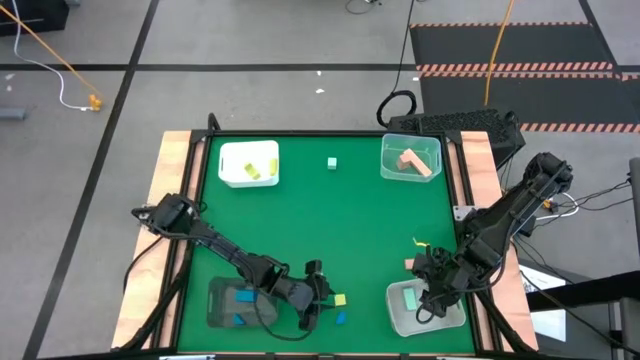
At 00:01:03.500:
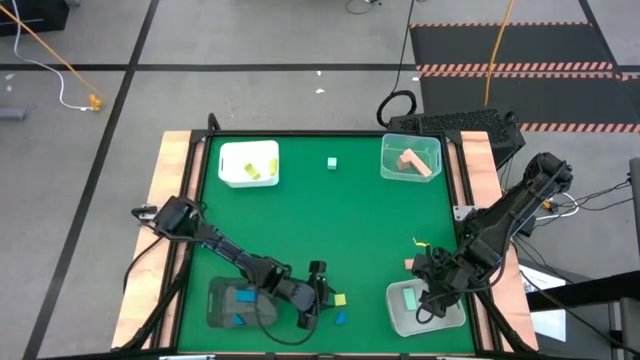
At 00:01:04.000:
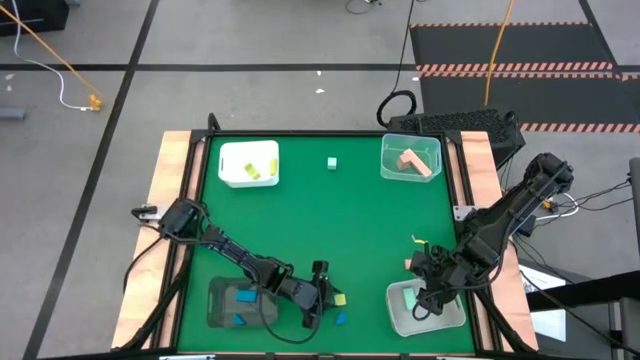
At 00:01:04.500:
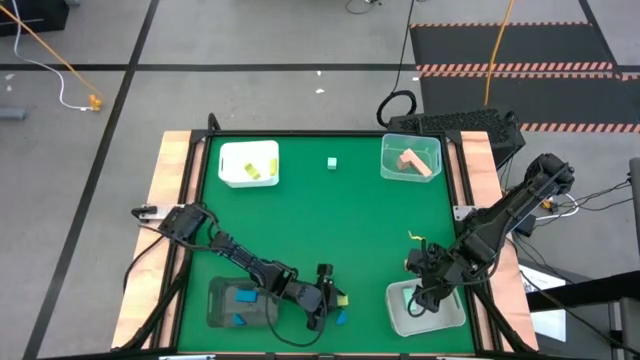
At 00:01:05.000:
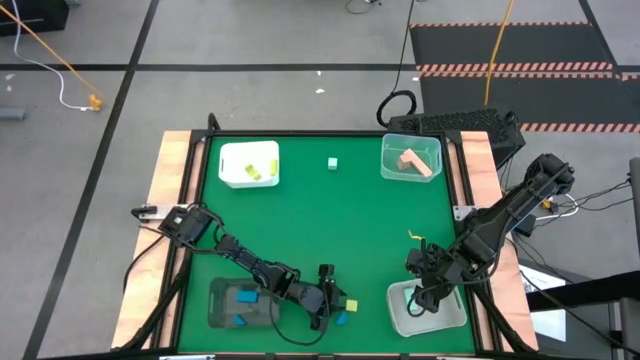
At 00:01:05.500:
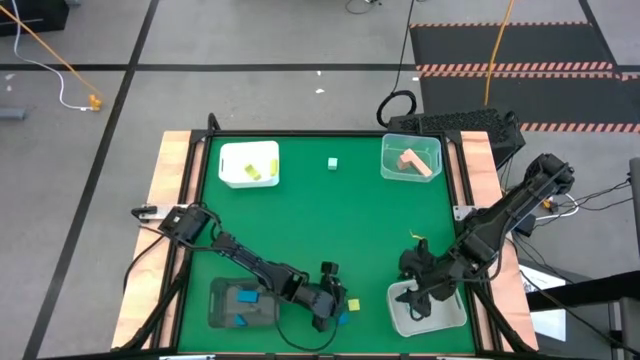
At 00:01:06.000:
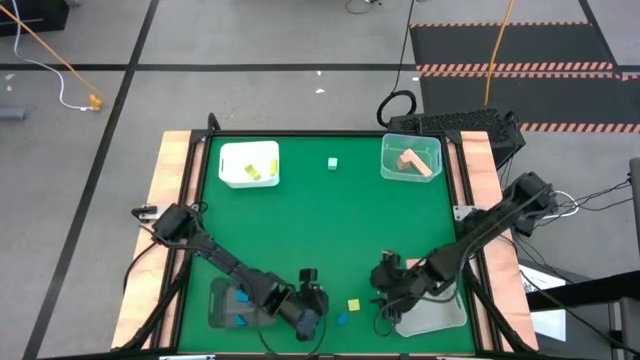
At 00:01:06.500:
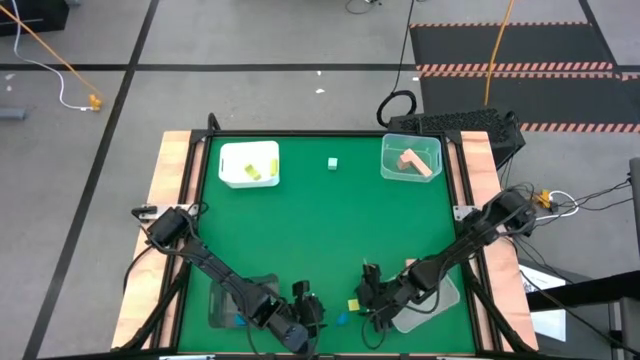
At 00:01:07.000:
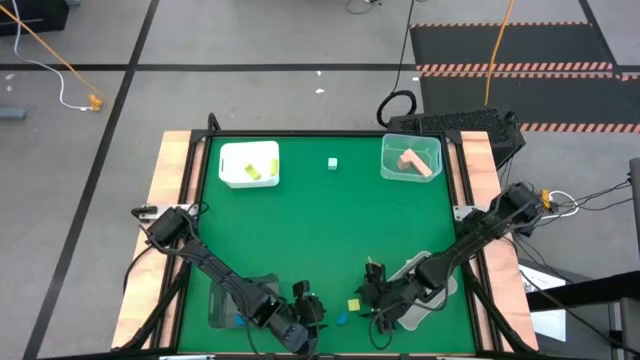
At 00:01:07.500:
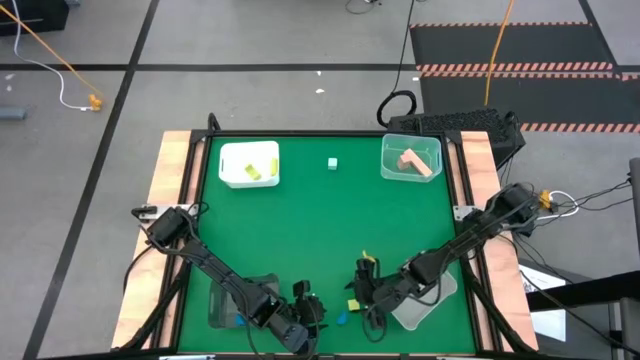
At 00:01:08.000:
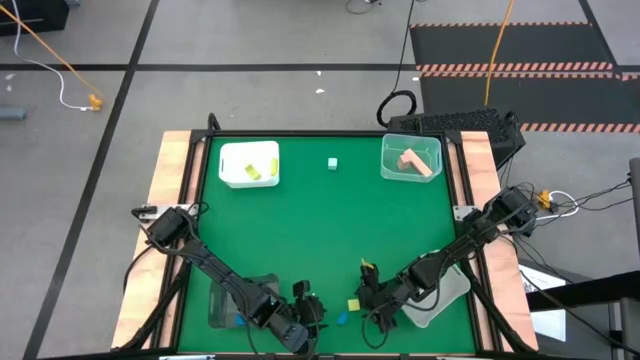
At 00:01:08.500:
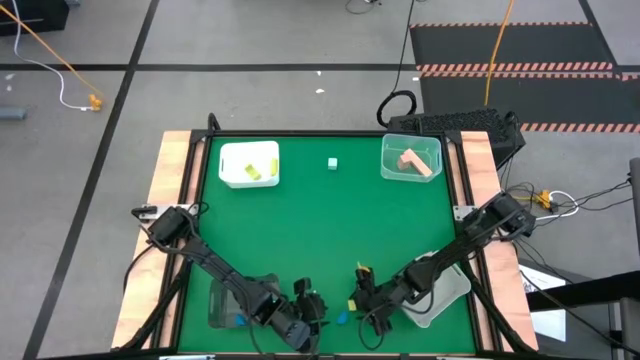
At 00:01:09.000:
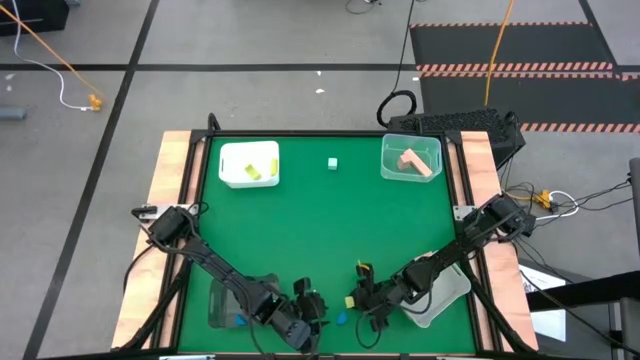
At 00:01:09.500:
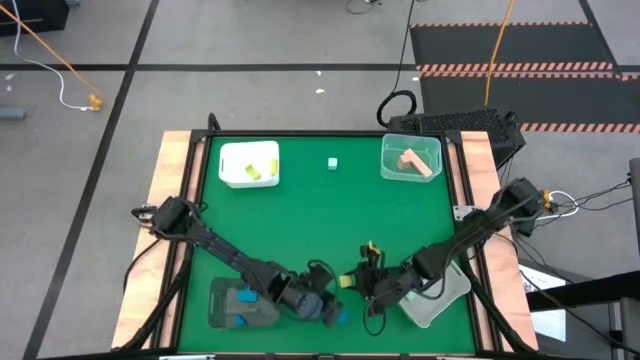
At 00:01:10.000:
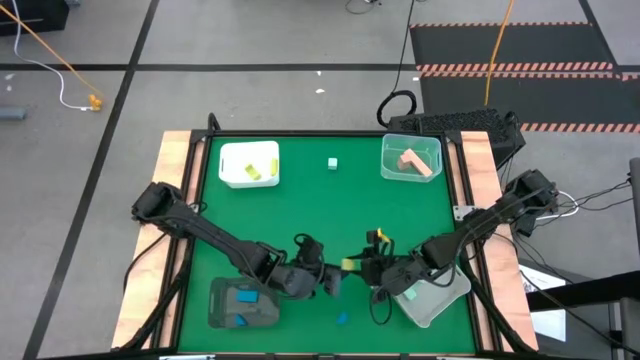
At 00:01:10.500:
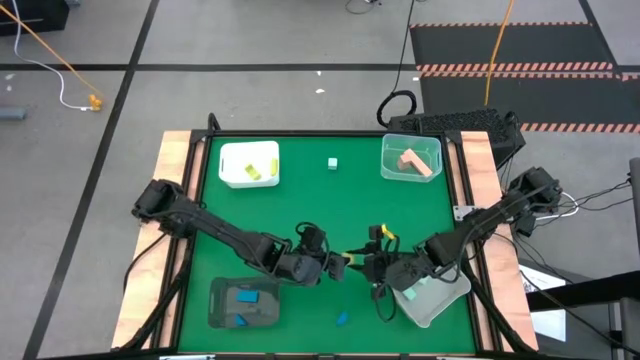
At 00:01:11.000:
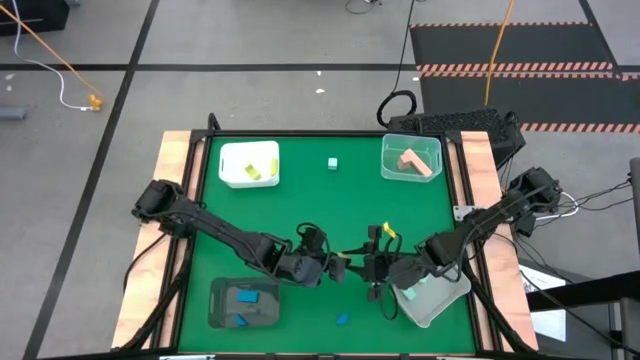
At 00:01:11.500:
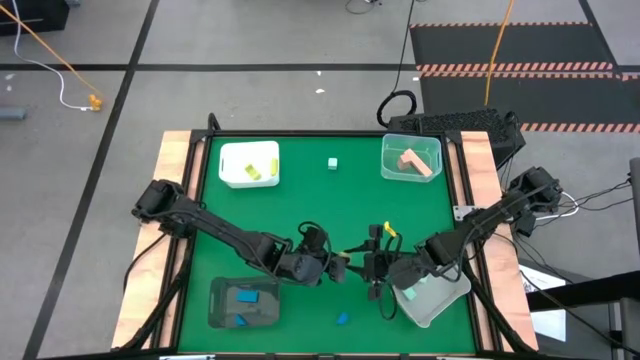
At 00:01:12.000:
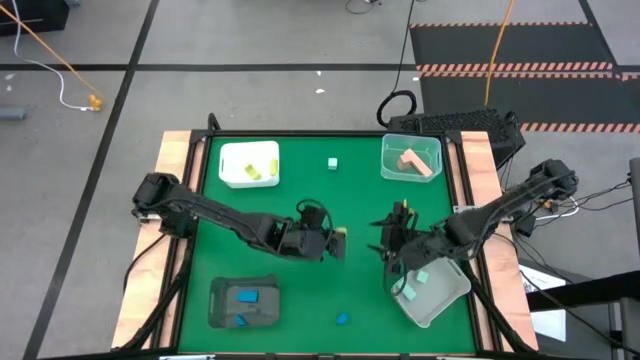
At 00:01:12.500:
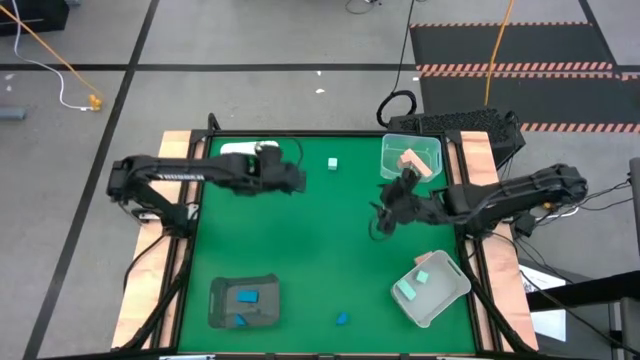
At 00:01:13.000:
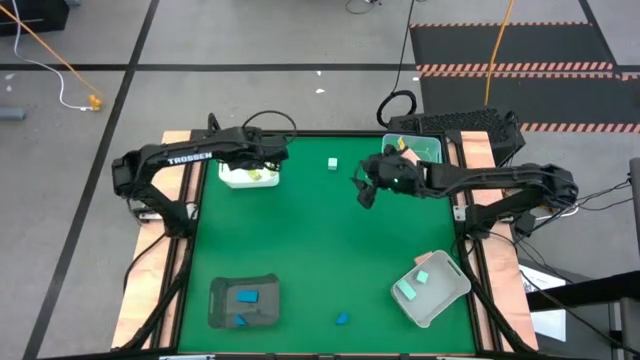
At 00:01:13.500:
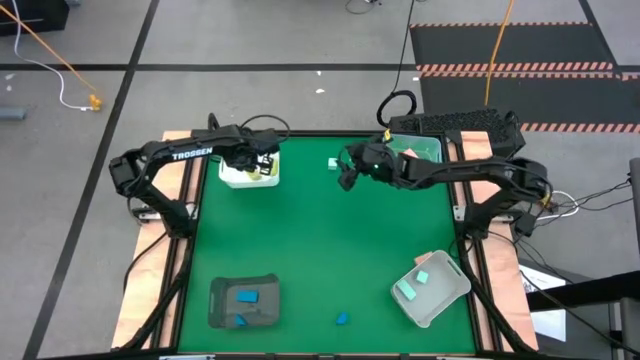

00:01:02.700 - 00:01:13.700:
Task: Sort & place blocks by color
Put the green block into the white bin

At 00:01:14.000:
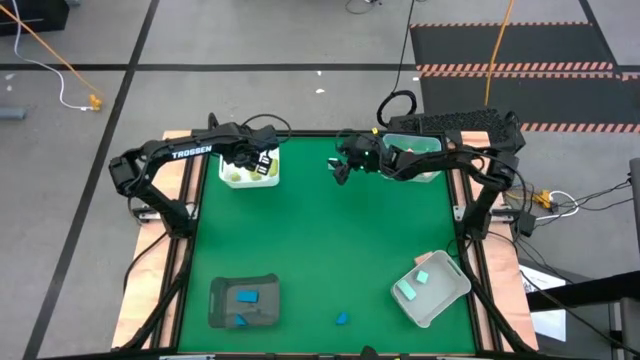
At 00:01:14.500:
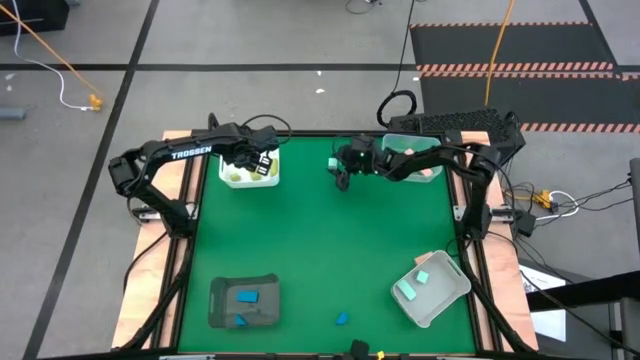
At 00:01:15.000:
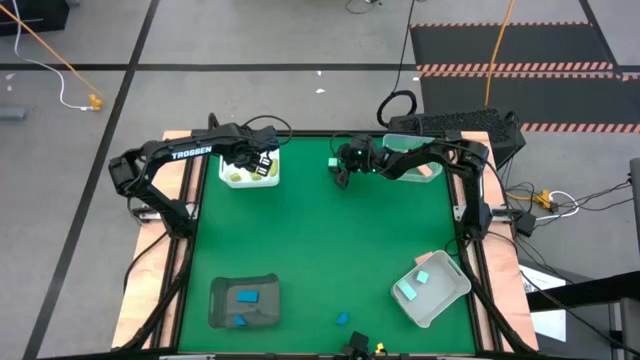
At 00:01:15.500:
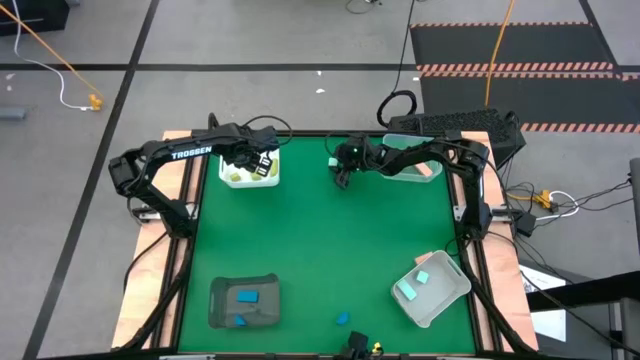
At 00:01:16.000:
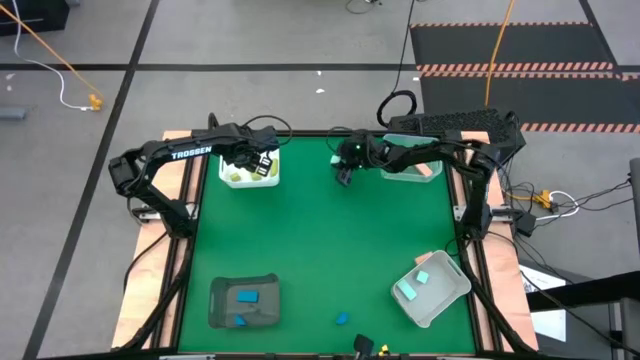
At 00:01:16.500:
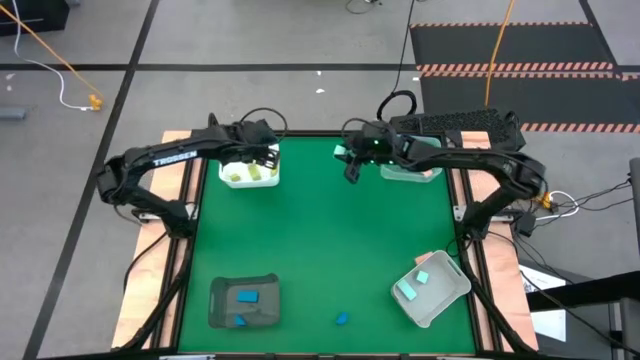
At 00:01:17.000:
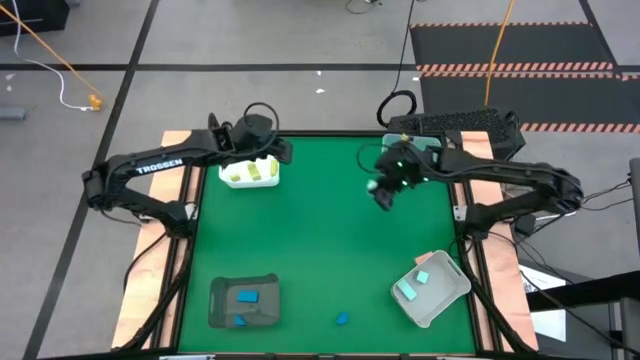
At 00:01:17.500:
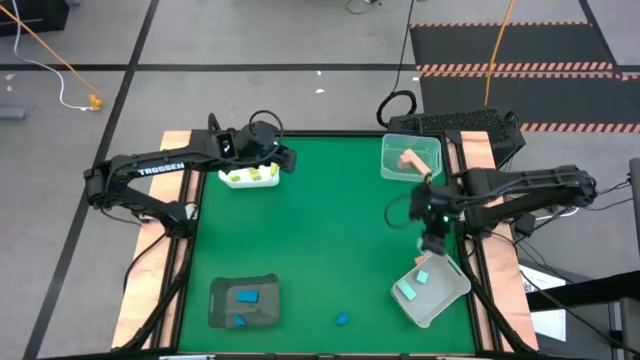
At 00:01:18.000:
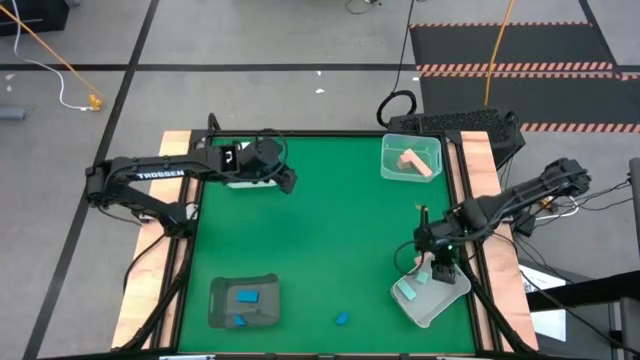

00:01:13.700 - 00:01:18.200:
Put the light blue block into the gray bin

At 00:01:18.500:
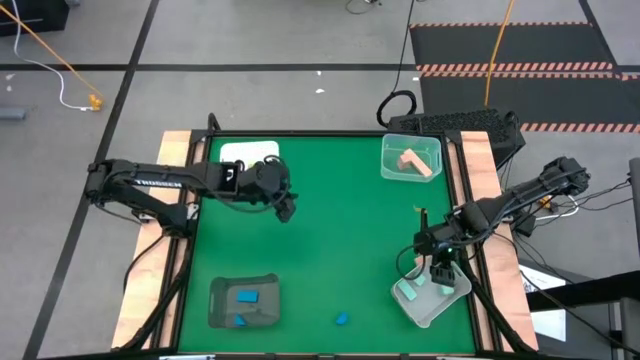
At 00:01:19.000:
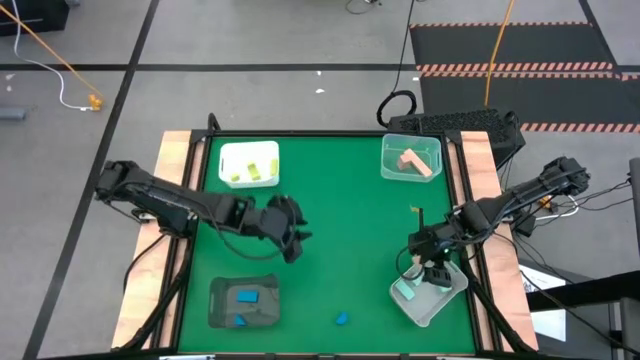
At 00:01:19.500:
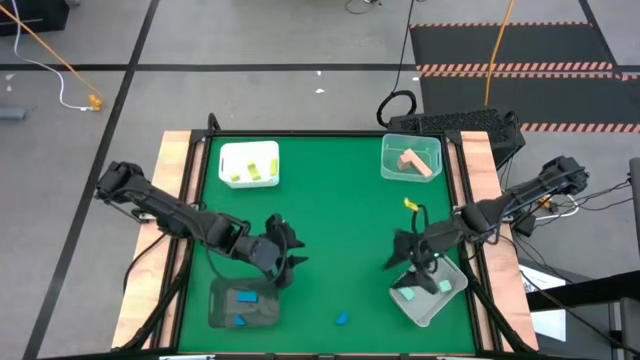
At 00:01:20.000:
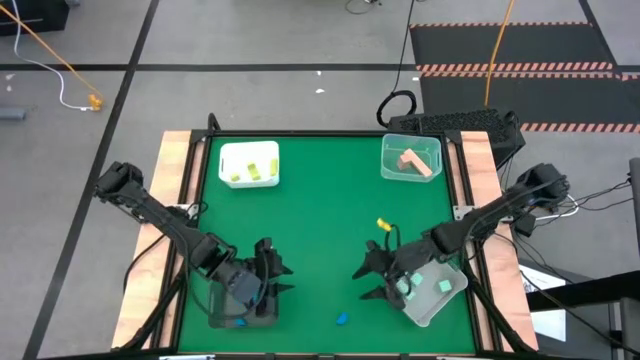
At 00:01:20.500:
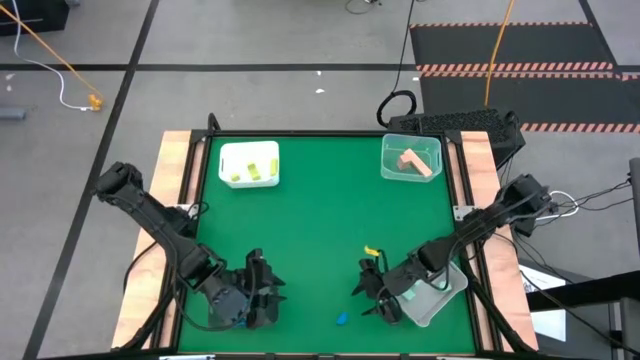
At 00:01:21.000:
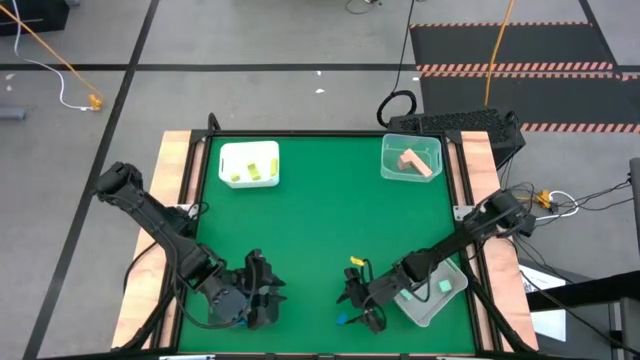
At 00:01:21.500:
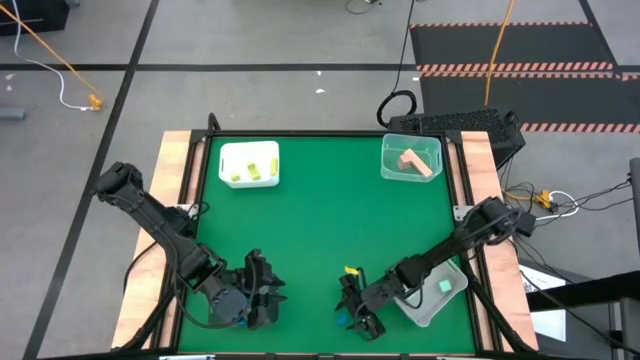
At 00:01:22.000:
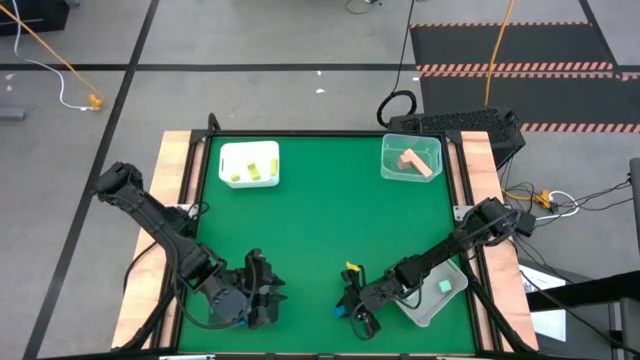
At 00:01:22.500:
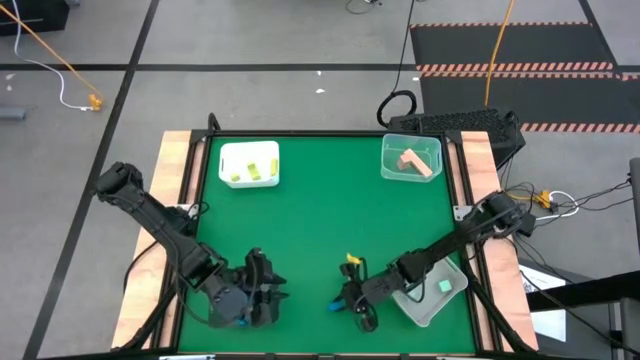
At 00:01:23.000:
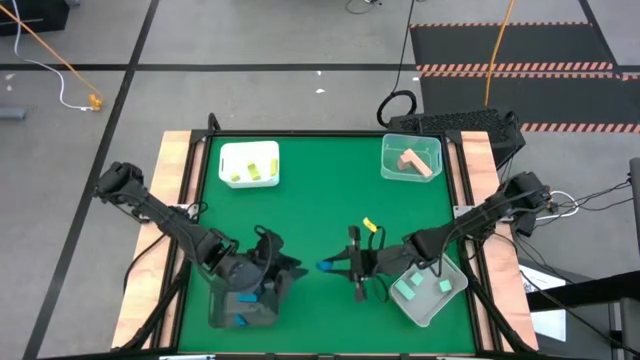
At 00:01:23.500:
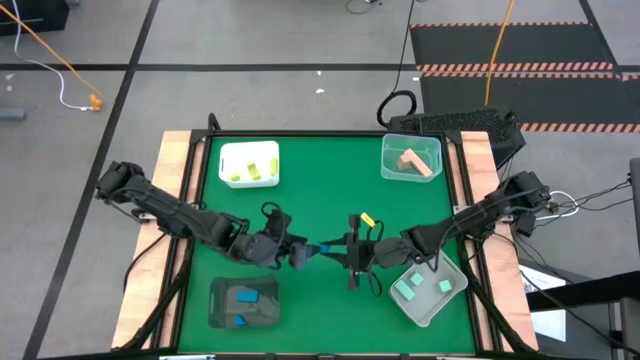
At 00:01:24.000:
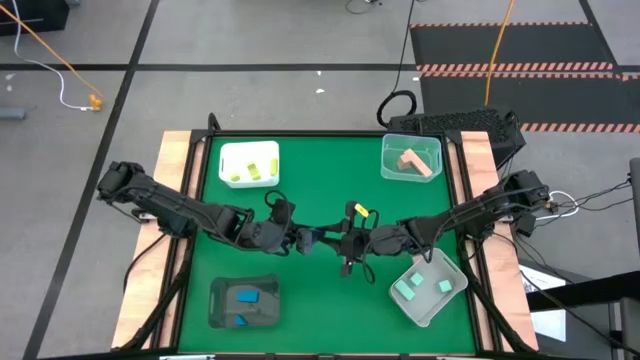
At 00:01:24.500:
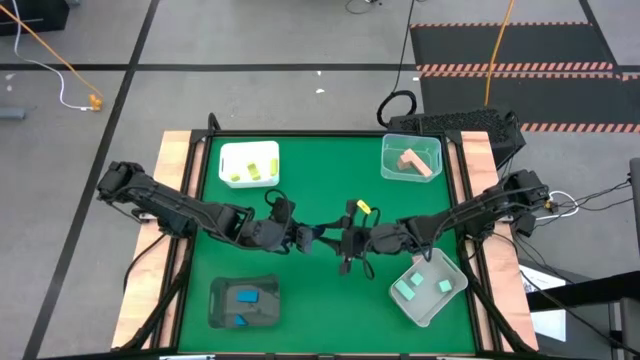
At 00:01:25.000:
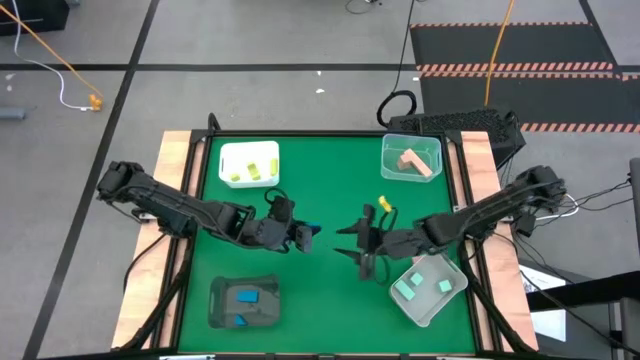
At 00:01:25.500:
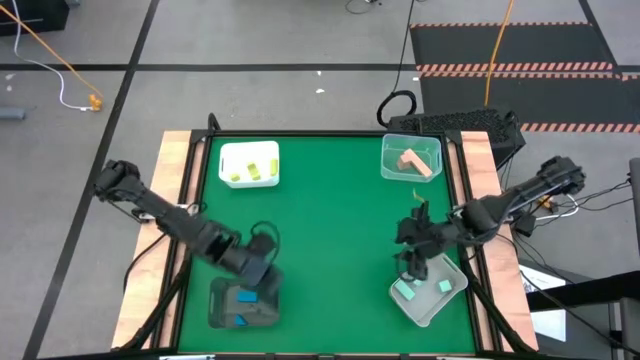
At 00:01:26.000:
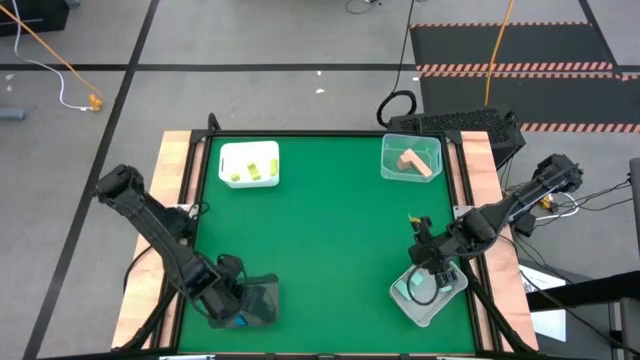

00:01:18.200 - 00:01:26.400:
Put the blue block into the black bin
